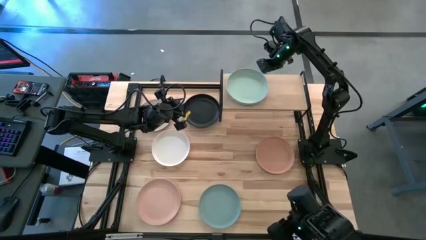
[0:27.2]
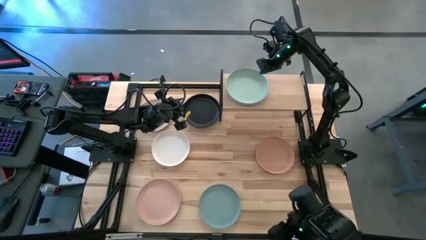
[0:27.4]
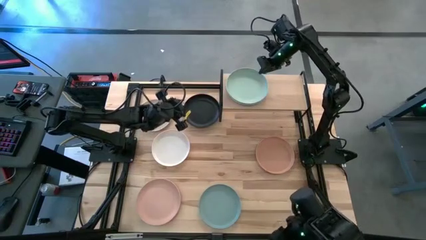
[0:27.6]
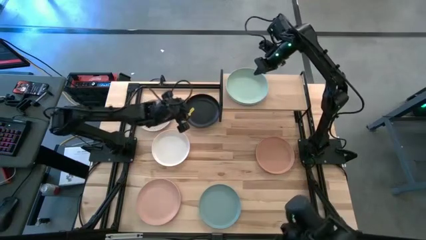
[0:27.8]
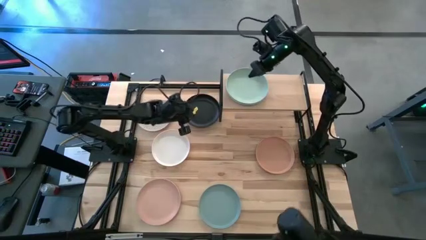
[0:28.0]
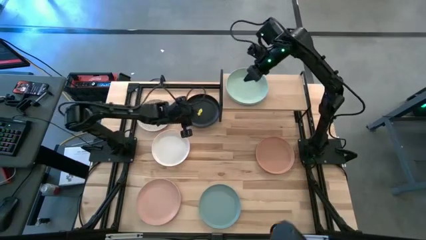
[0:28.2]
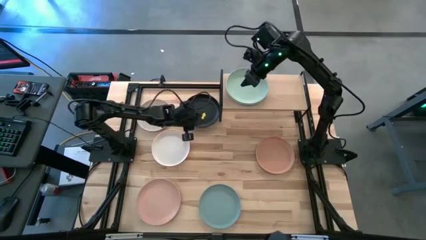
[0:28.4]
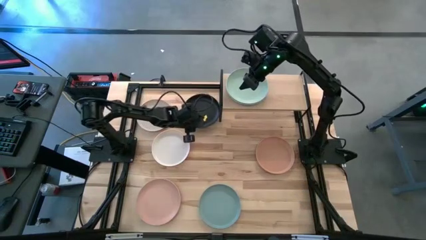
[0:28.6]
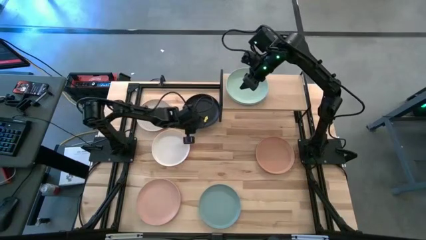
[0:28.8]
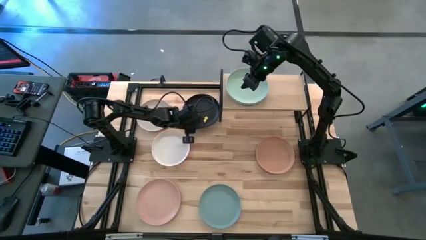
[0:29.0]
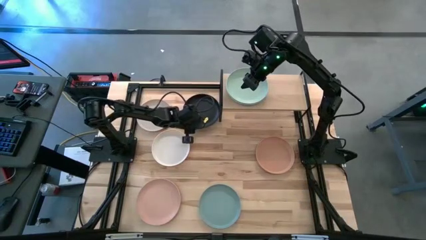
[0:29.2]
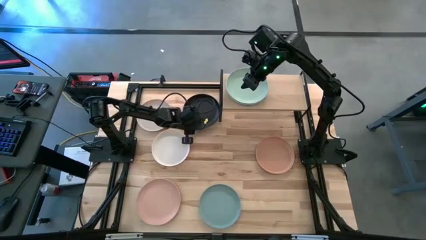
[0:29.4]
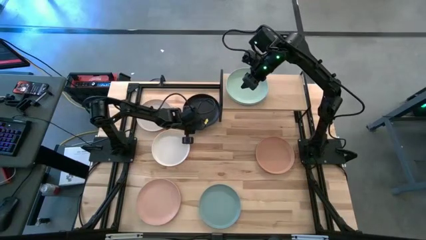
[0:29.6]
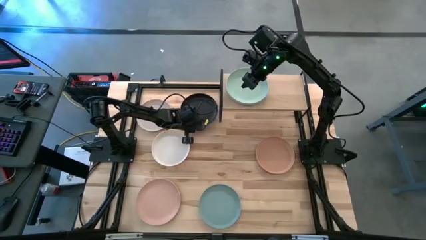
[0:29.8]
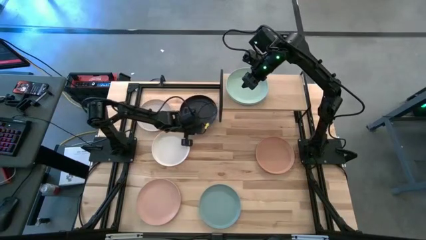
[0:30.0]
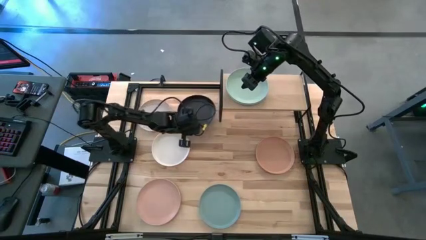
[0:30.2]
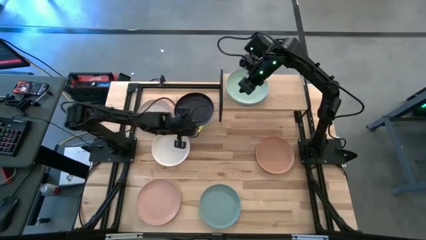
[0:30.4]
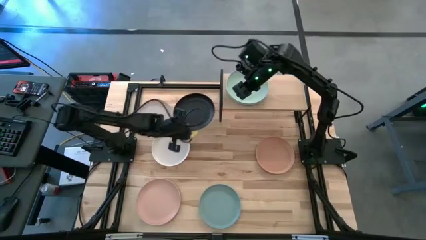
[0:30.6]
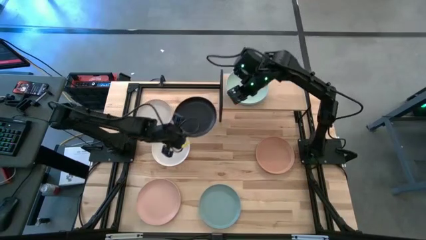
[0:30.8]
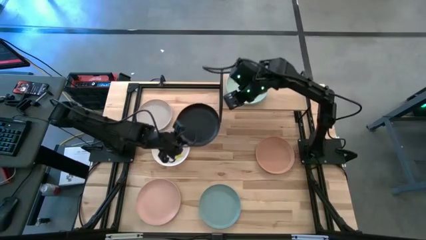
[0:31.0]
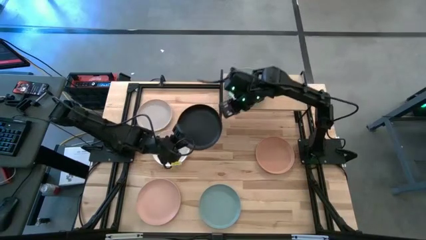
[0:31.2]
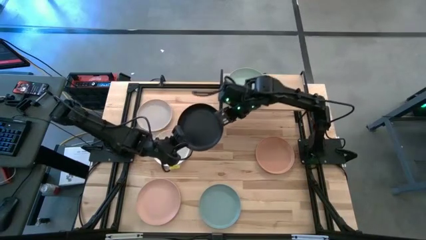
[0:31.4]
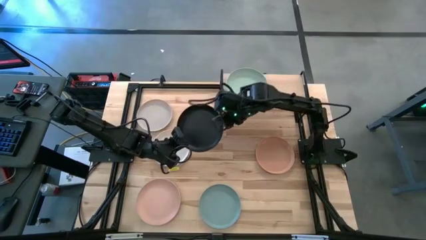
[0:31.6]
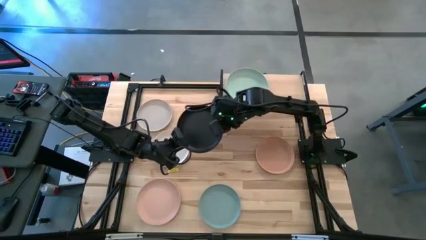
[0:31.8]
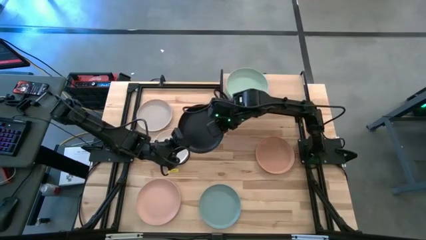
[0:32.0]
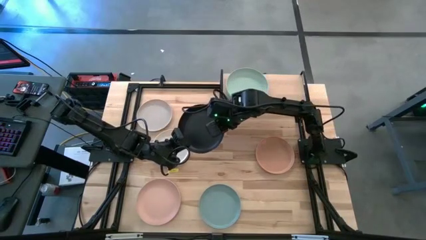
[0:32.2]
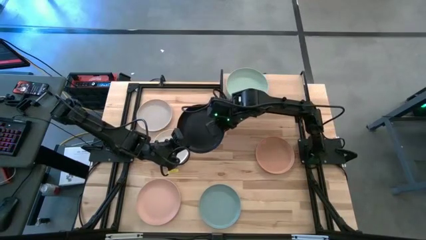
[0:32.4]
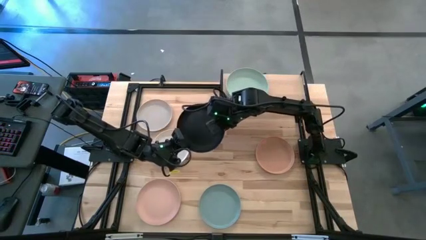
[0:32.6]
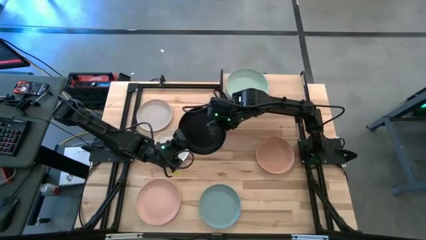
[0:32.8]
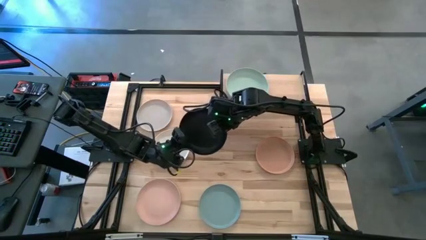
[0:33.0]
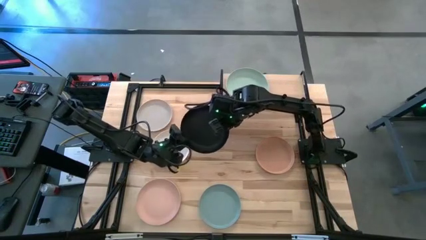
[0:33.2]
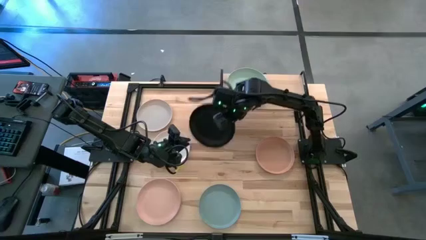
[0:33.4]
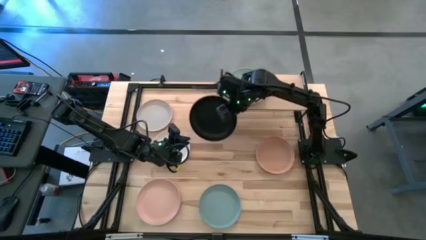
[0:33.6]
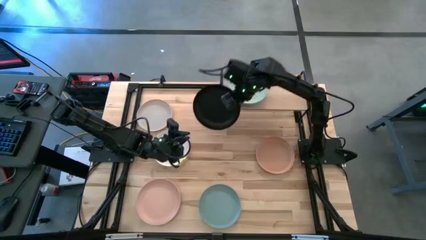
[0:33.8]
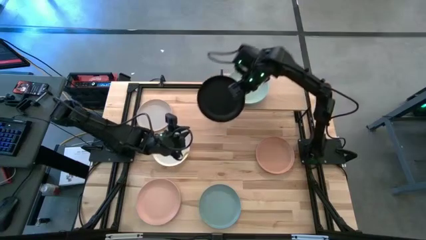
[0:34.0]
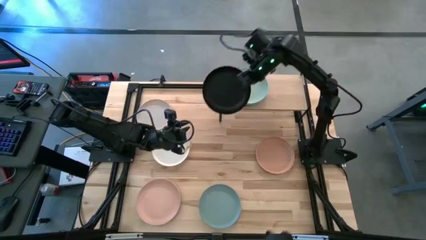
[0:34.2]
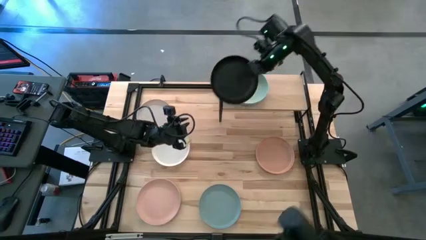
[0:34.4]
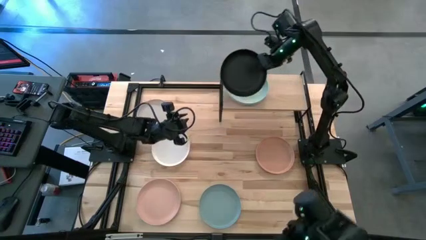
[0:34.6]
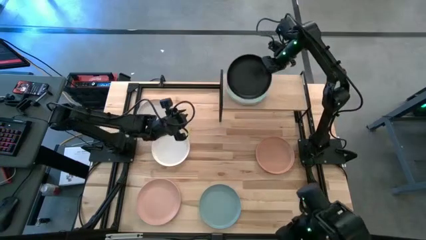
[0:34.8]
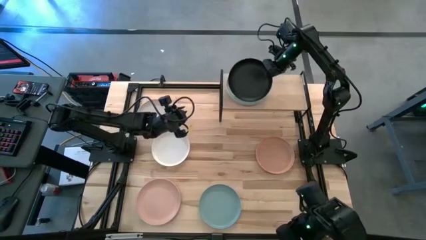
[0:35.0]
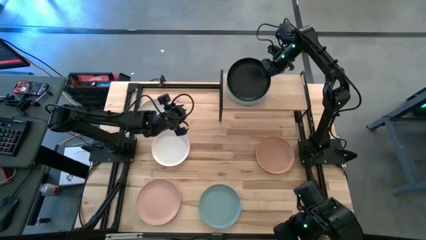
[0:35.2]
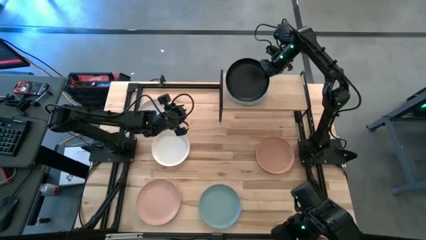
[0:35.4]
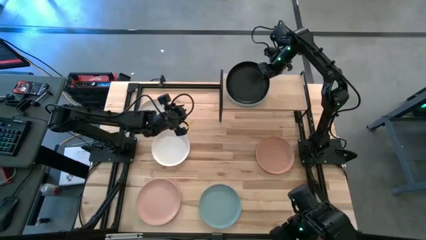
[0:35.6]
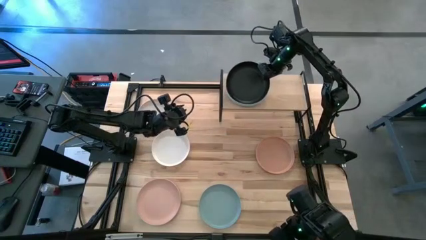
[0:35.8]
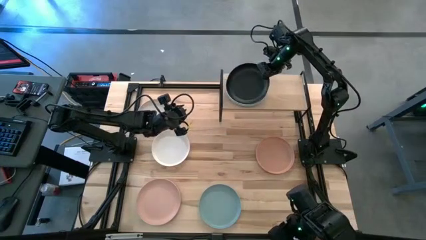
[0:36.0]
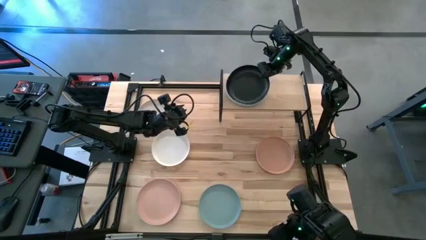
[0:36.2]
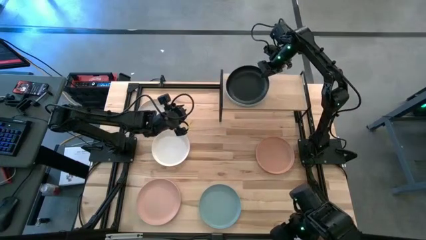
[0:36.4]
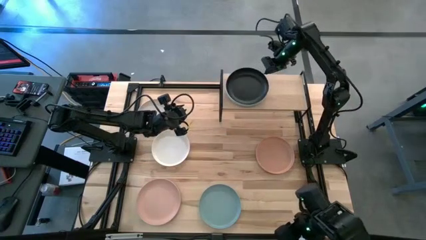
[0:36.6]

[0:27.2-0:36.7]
Task: Place and stack plates onto a shelf
Stack the black plate on top of the green plate on the shelf

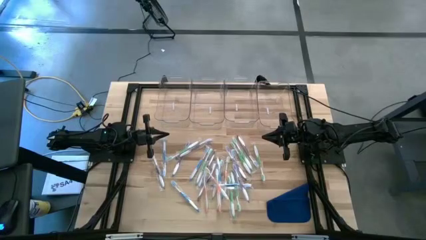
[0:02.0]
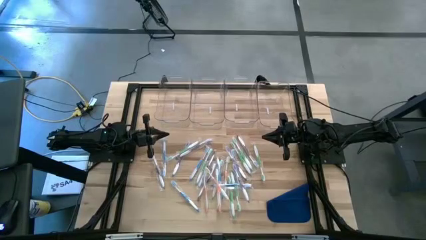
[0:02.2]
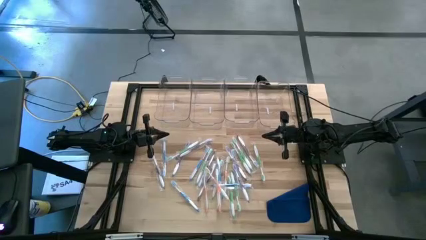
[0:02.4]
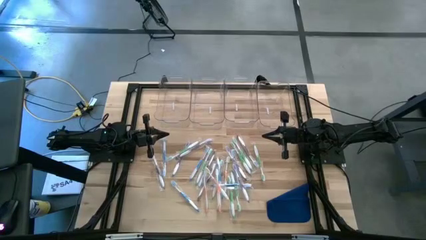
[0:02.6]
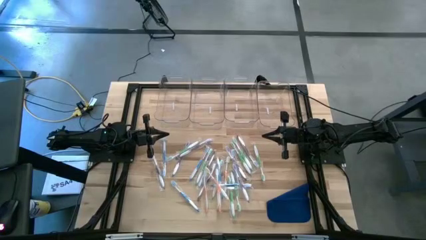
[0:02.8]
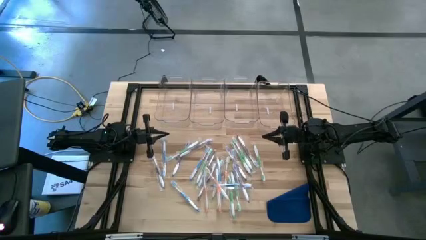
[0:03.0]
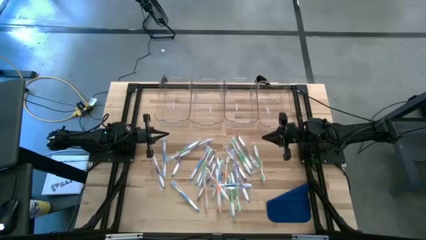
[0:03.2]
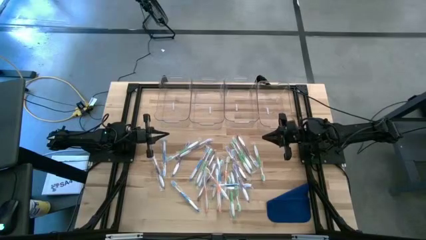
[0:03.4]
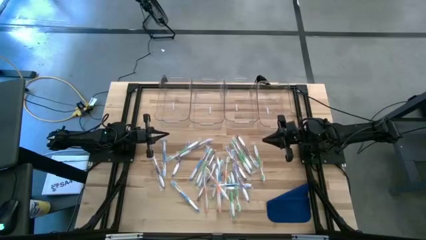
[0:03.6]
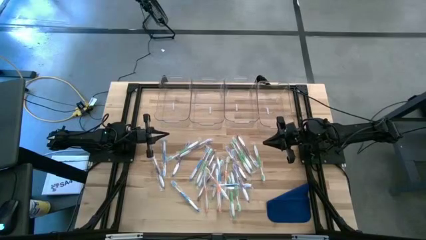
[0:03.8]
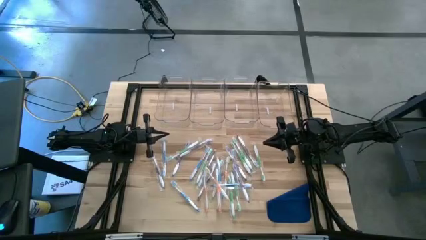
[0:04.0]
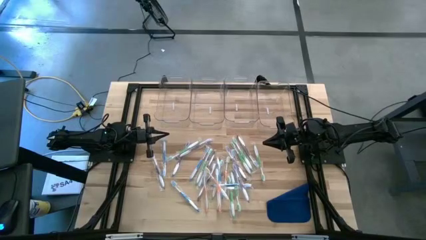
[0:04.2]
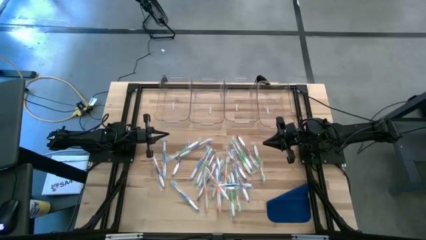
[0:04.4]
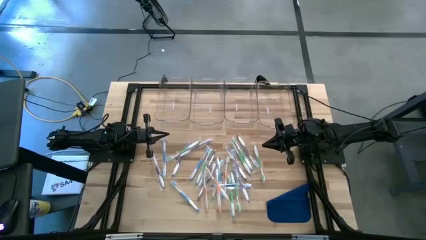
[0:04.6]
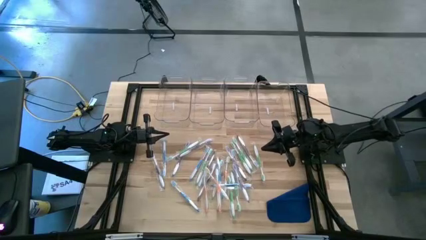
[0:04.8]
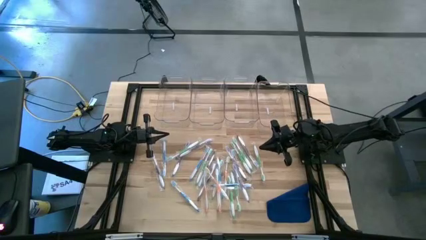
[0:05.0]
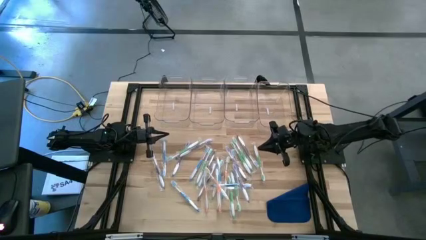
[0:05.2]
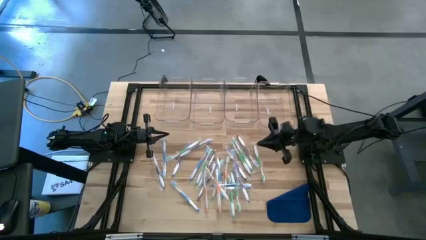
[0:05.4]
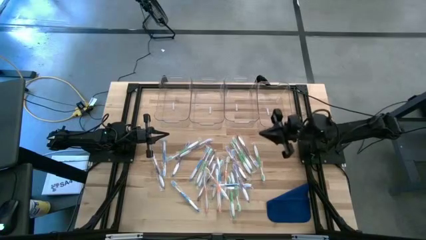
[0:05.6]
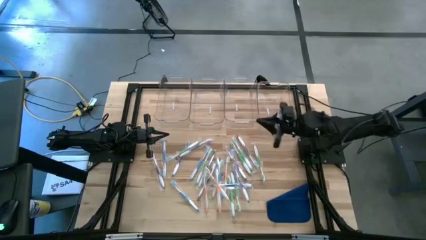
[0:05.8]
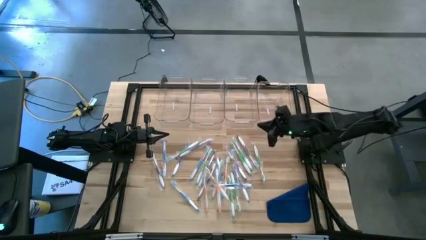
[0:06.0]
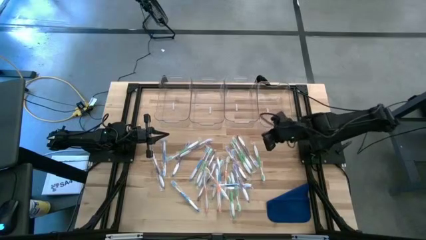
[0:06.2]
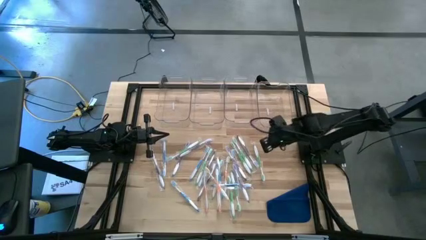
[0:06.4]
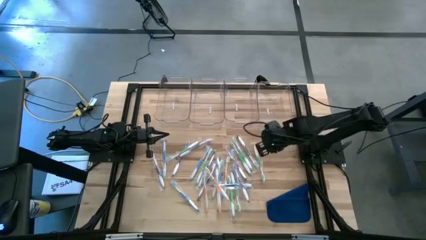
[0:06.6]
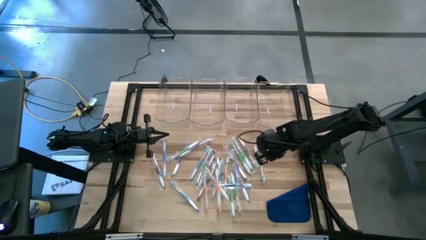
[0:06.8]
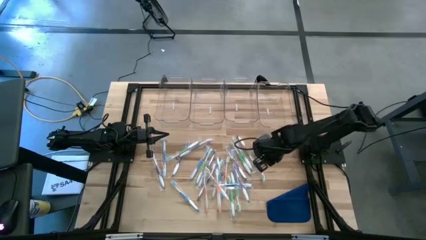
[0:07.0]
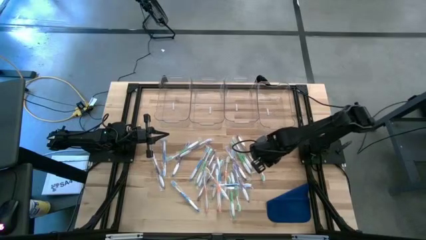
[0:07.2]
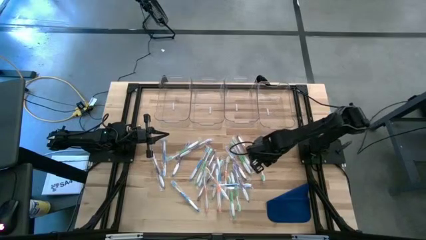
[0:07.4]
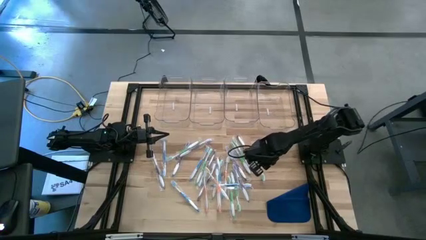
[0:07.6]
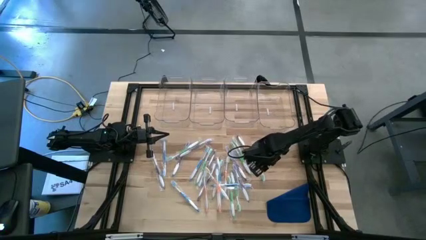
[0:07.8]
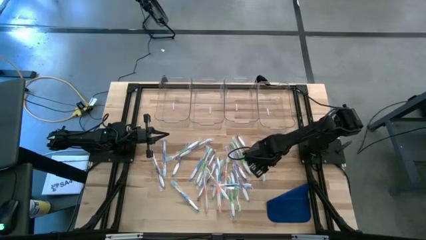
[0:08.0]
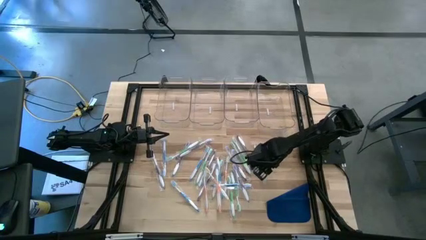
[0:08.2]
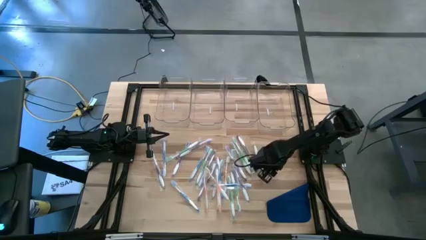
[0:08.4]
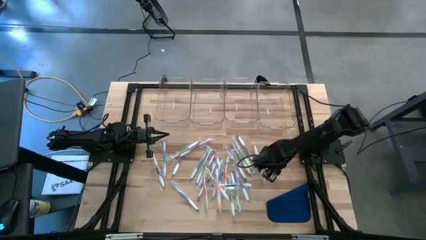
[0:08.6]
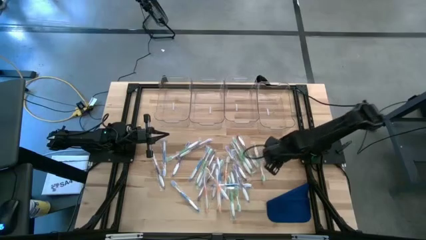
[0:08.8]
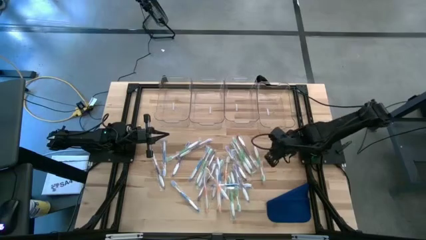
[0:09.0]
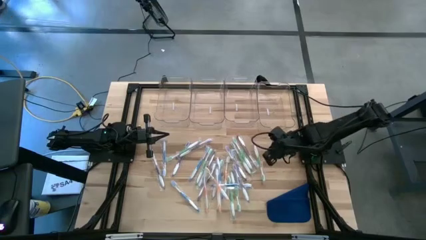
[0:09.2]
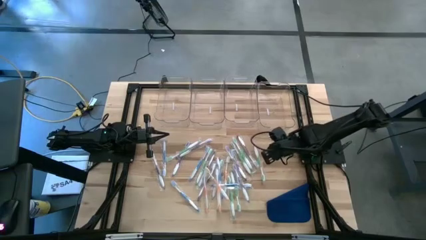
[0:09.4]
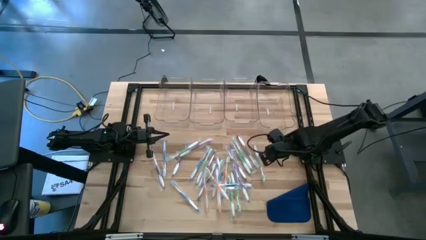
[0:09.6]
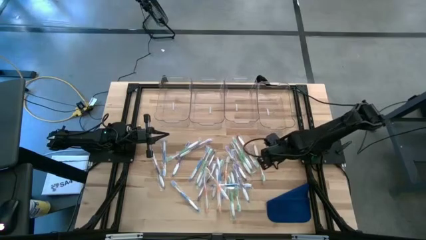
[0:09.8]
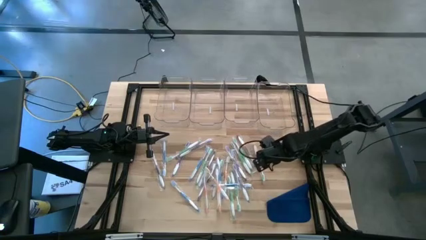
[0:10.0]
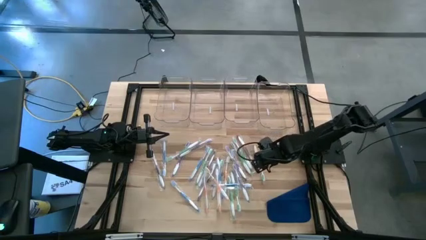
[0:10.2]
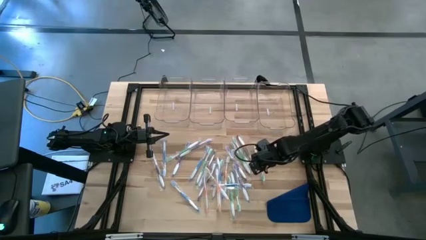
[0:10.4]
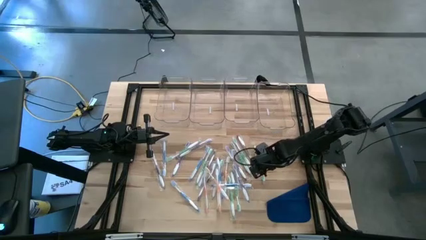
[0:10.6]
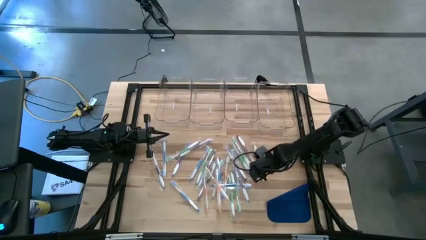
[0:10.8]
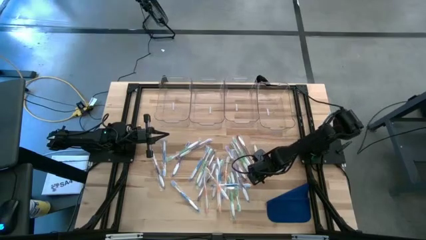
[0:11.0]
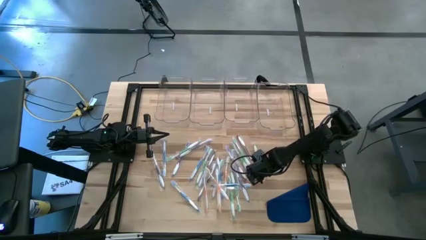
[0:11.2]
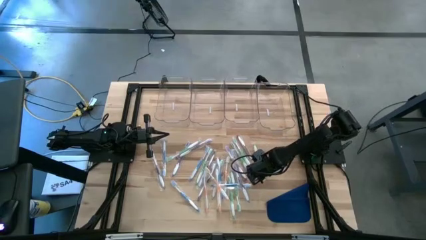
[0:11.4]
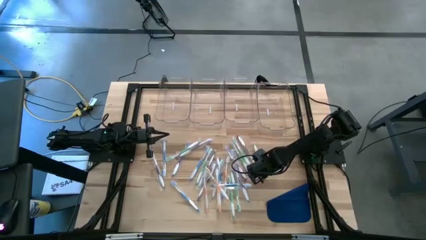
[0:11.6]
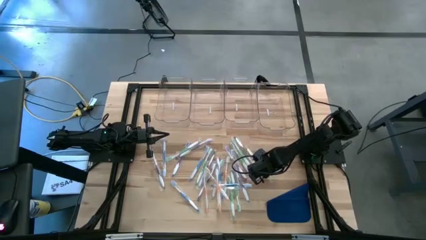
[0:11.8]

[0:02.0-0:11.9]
Task: Pick & Place Toothbrushes
Put the green toothbrush into the left transparent bin
